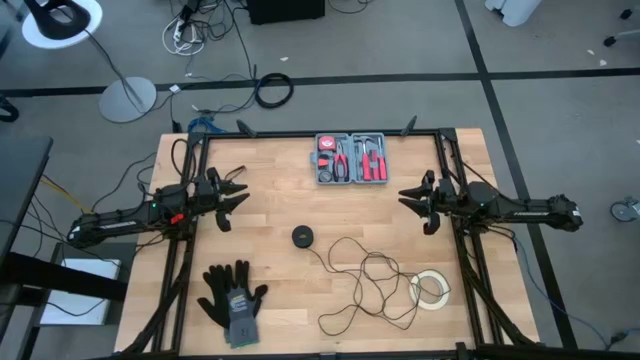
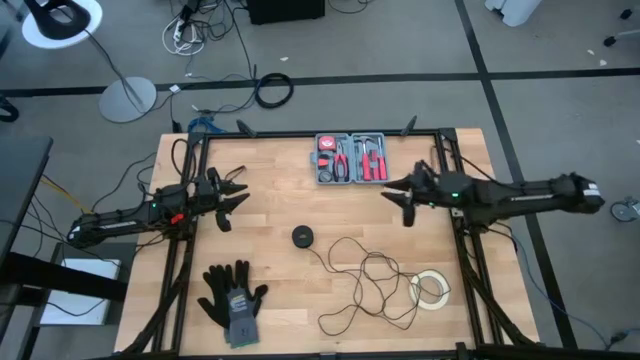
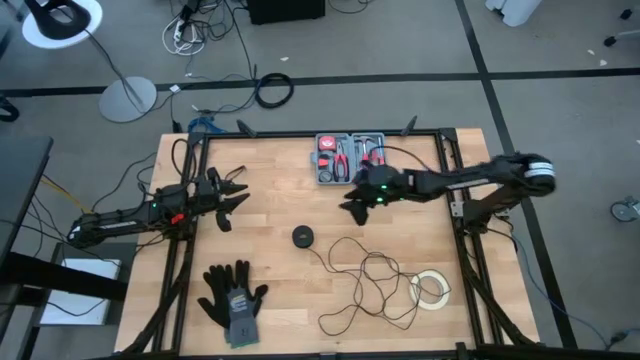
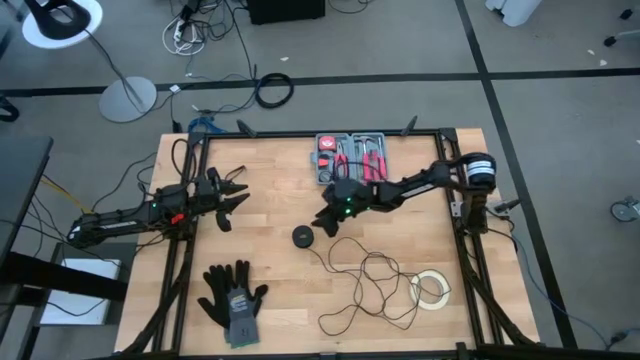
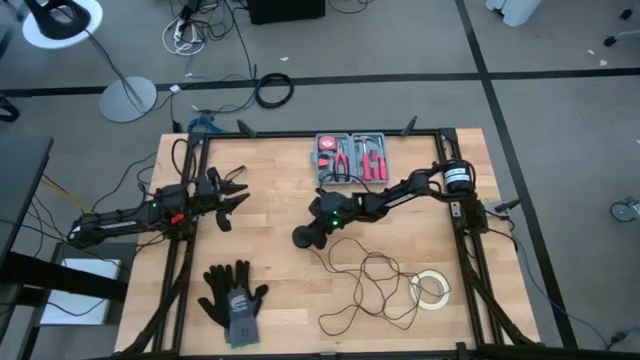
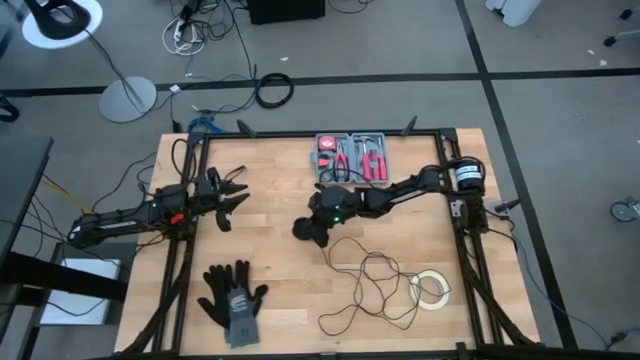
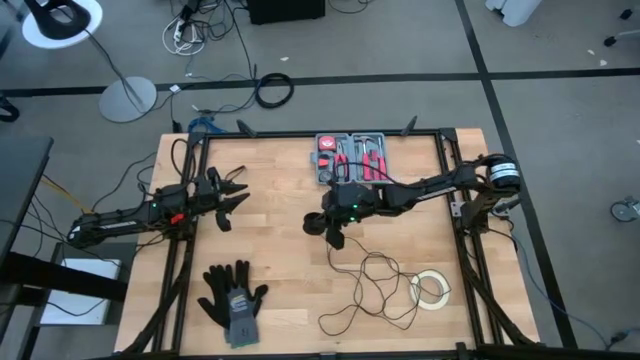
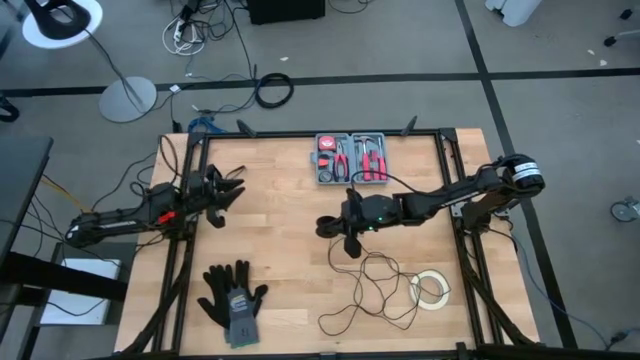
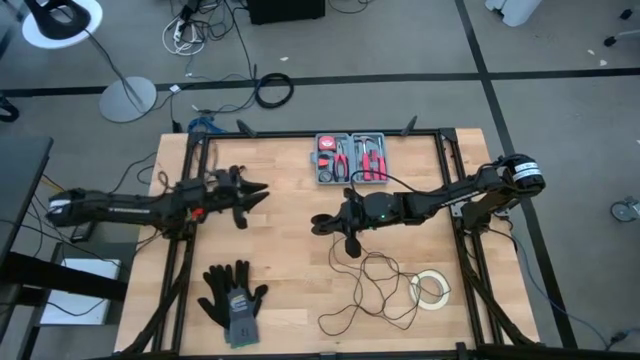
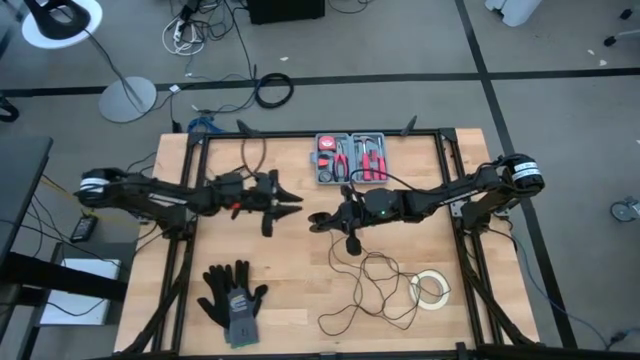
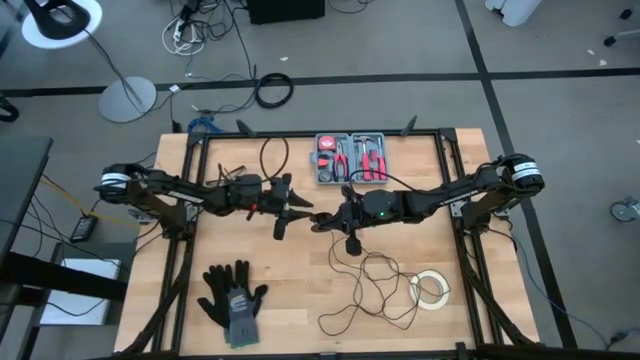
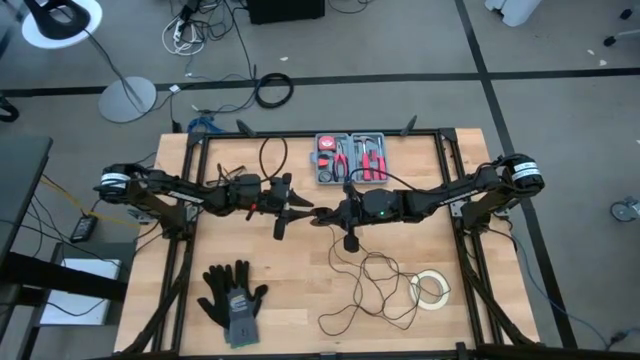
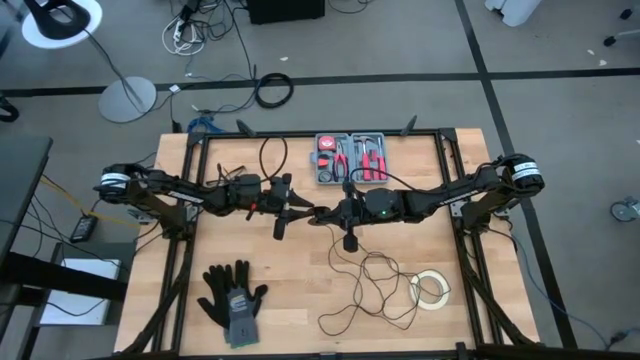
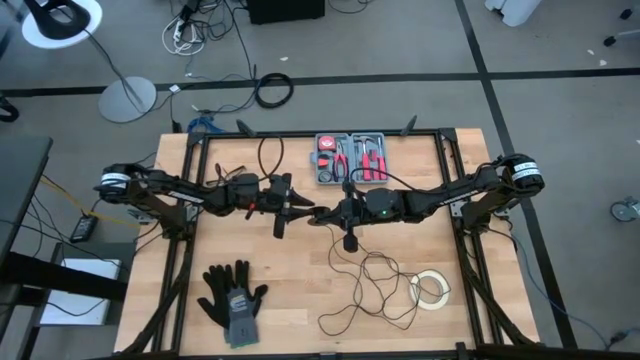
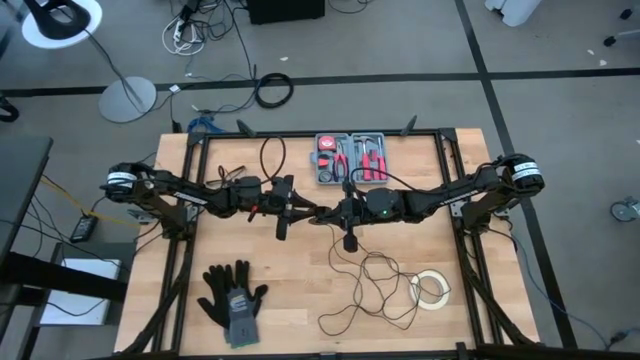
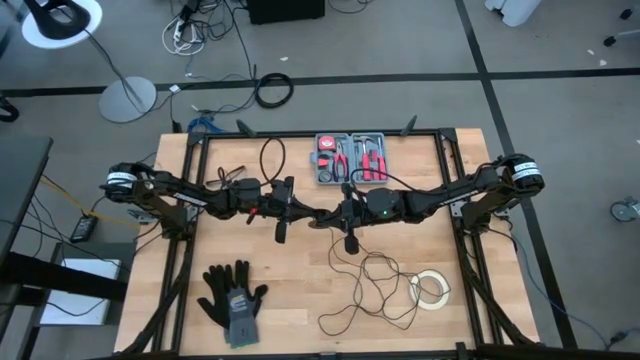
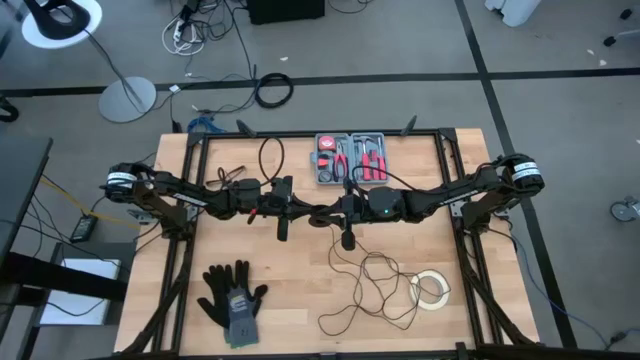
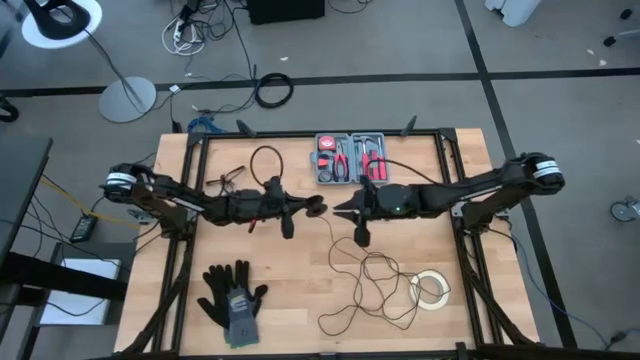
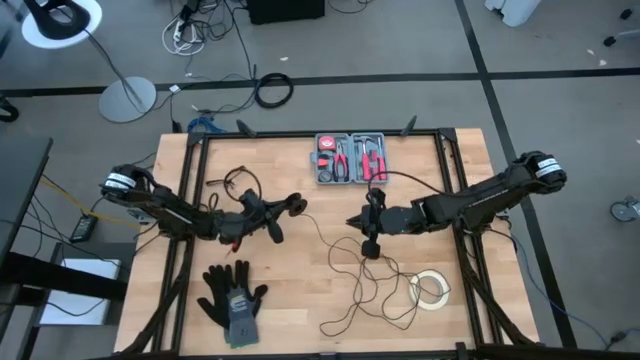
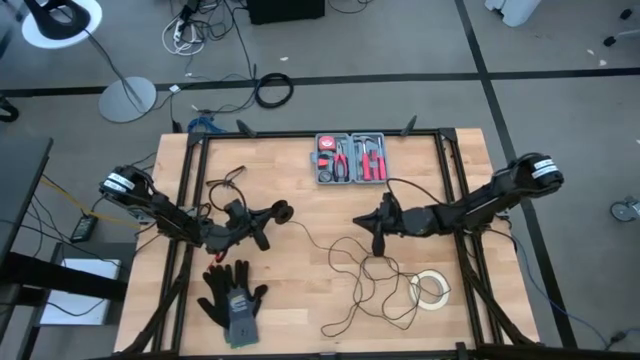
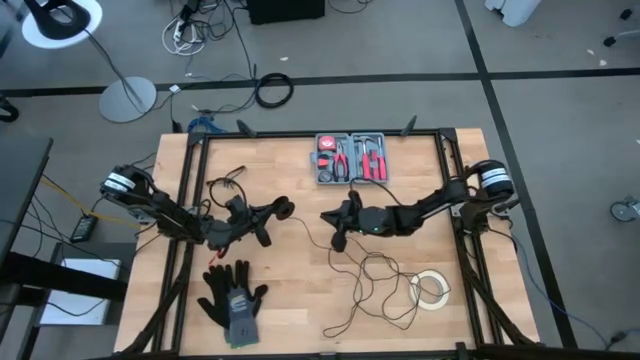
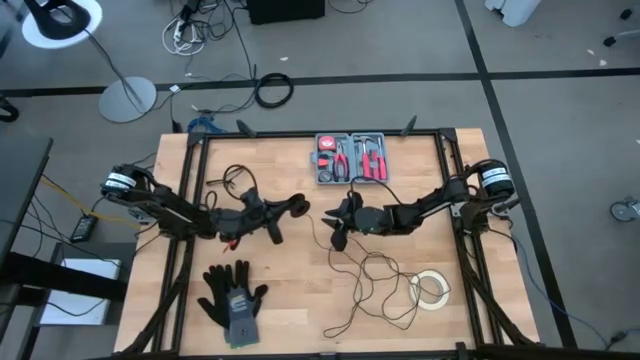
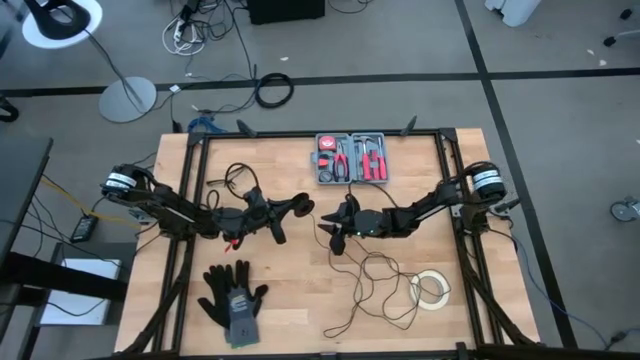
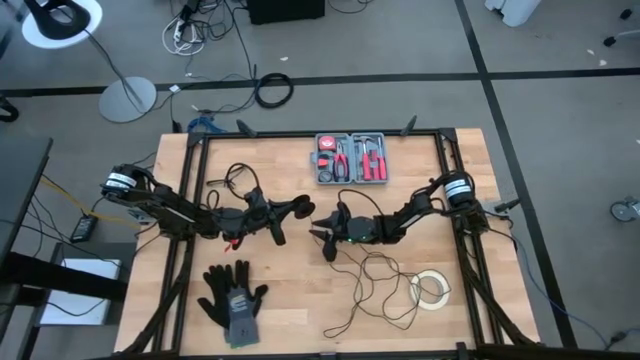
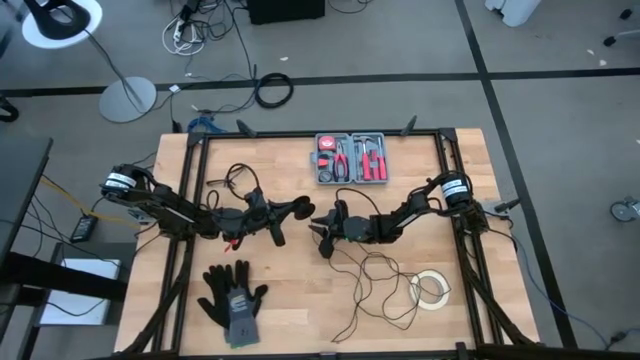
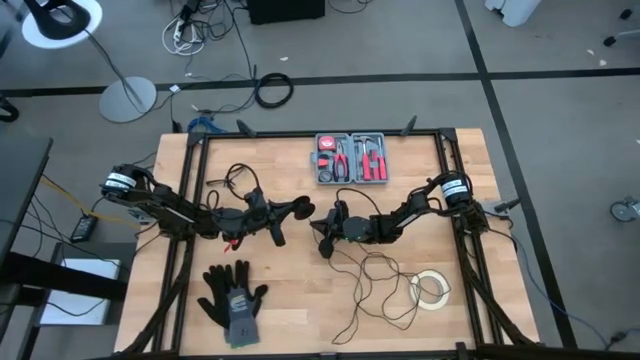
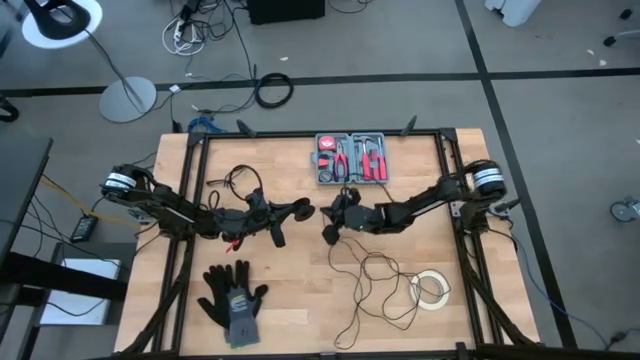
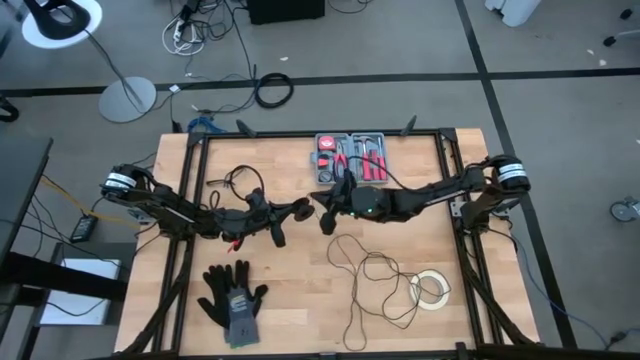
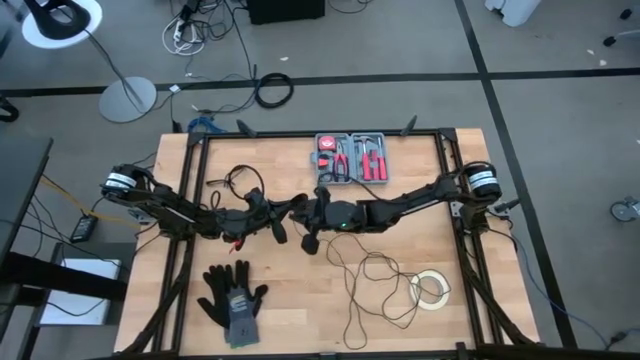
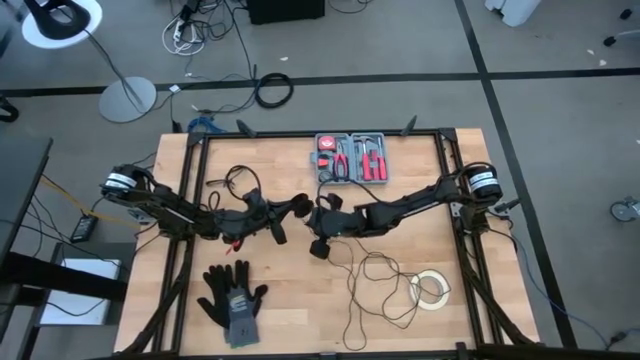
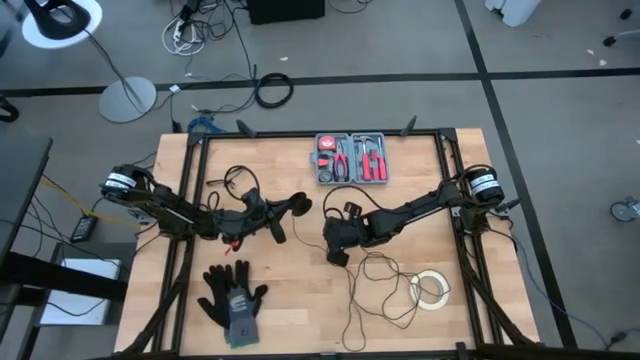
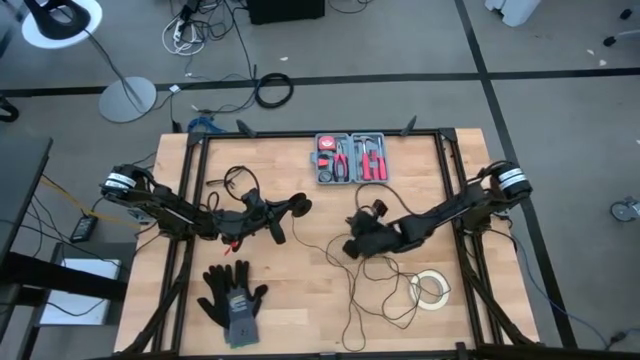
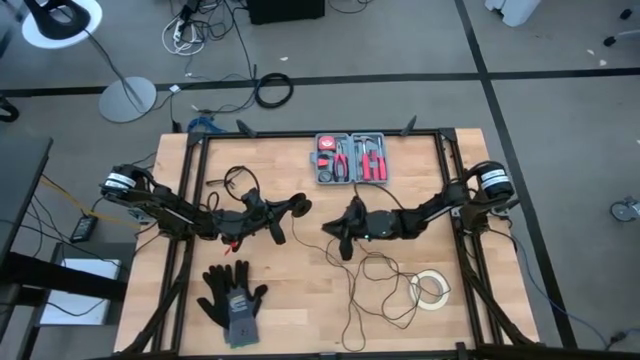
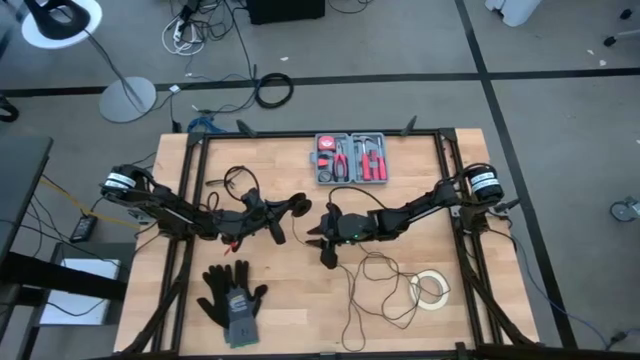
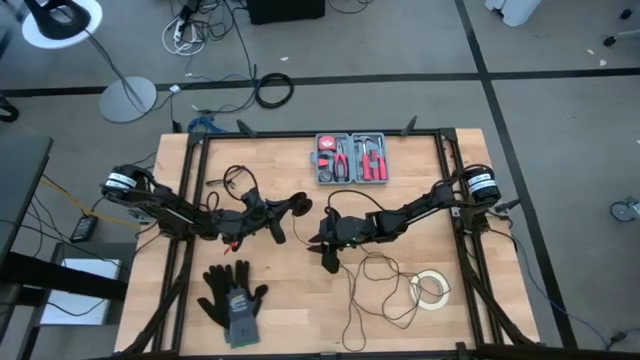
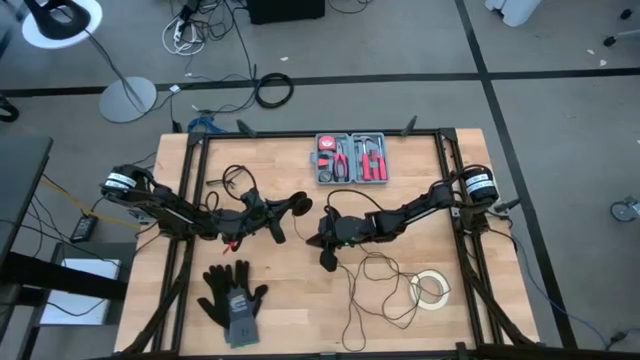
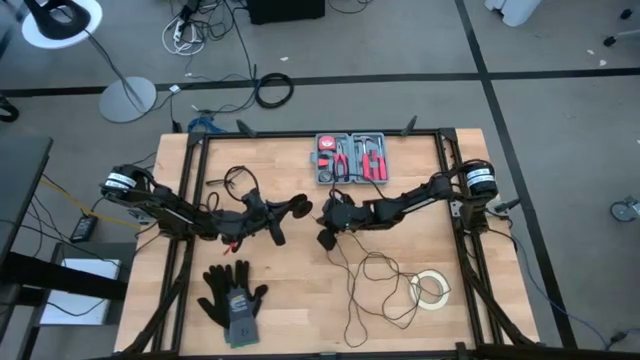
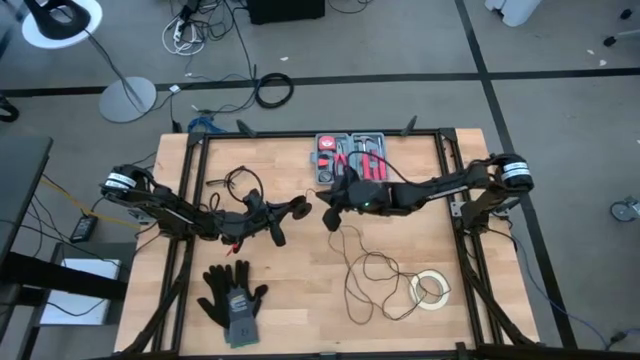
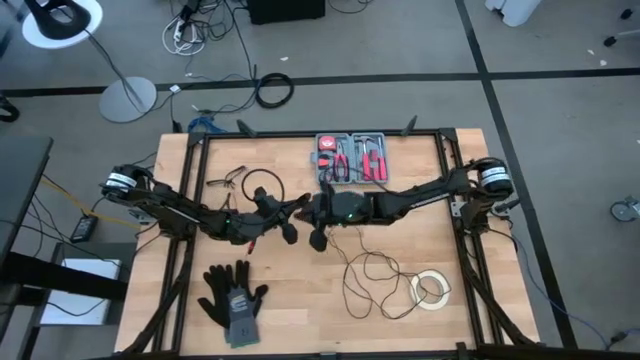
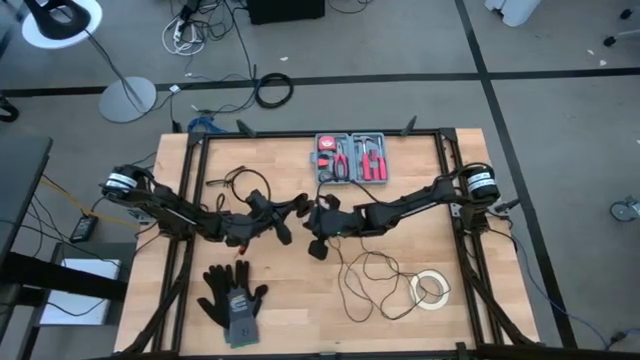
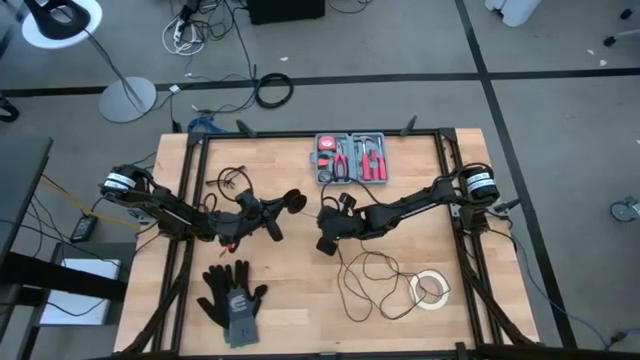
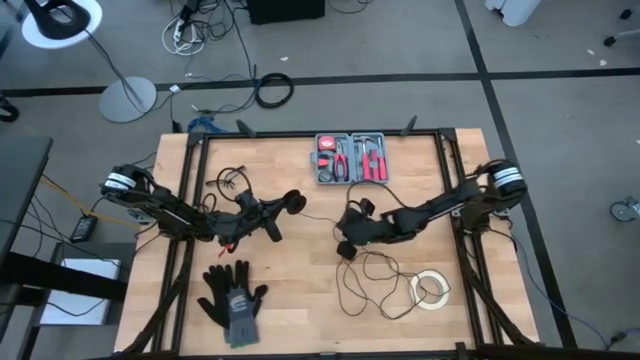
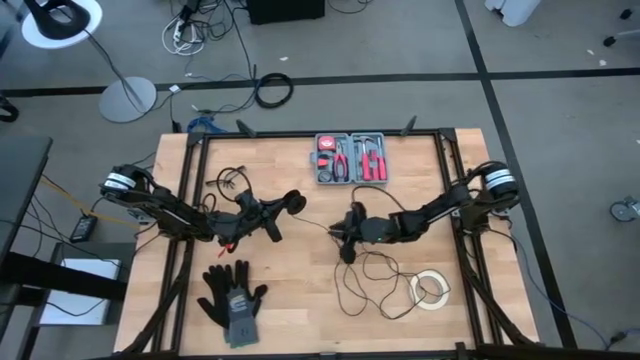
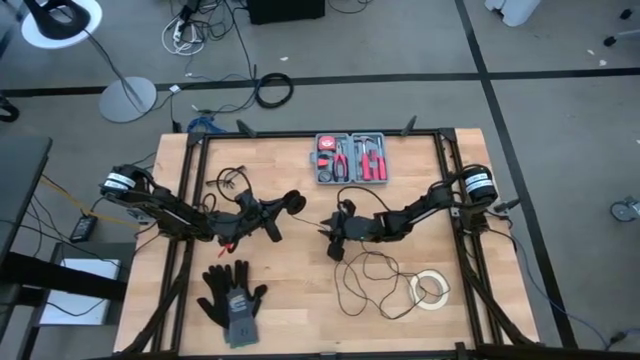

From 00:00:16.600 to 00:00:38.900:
Task: Coil cords
Coil the black wire onto the black spool
